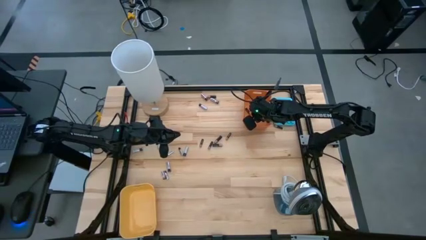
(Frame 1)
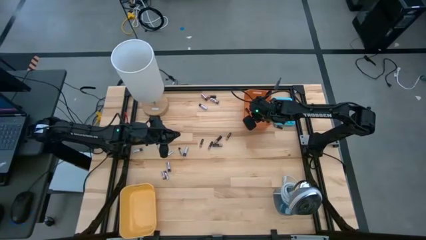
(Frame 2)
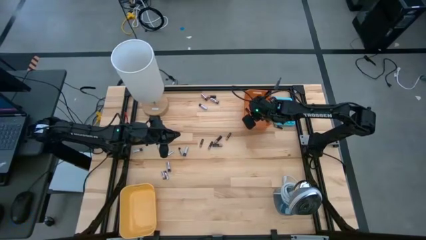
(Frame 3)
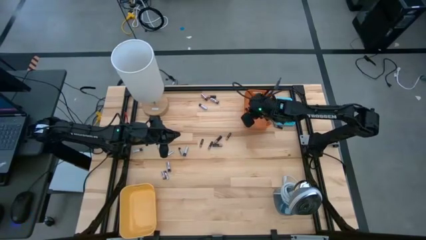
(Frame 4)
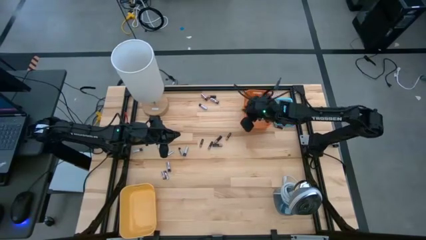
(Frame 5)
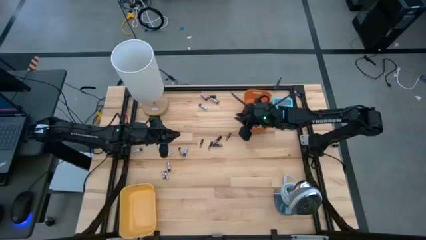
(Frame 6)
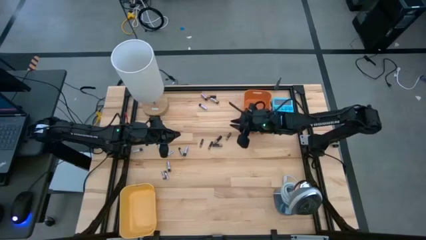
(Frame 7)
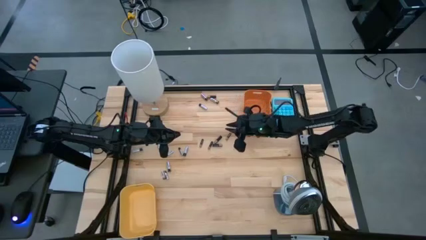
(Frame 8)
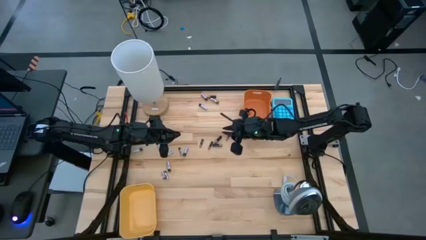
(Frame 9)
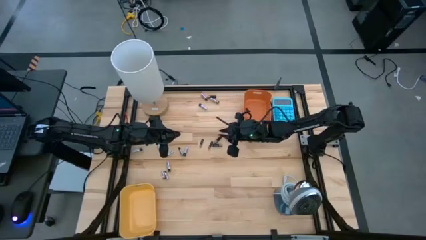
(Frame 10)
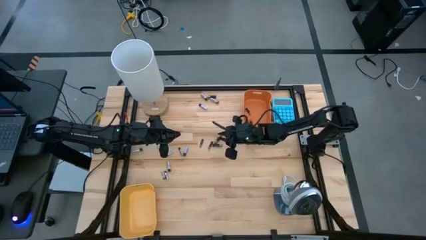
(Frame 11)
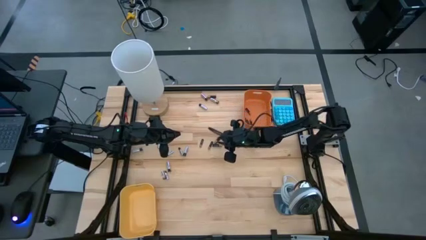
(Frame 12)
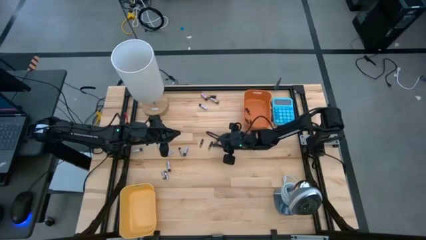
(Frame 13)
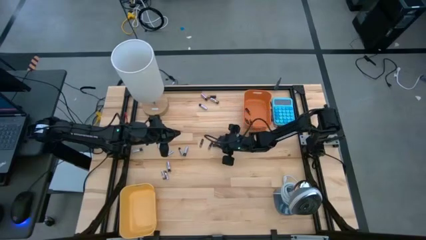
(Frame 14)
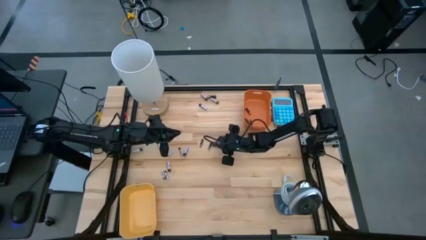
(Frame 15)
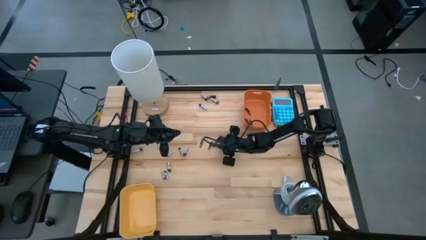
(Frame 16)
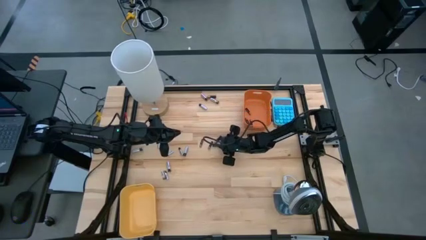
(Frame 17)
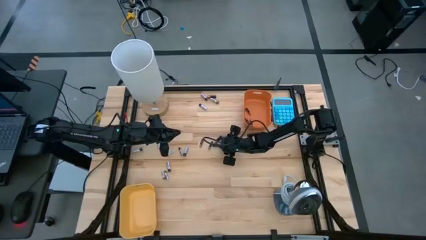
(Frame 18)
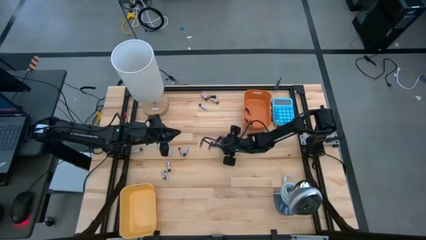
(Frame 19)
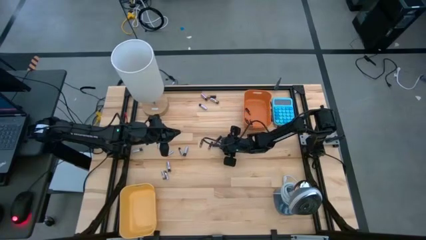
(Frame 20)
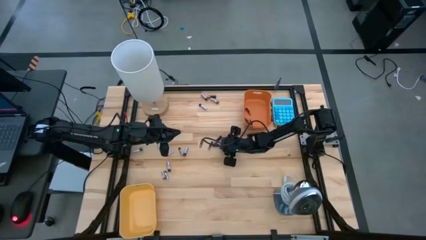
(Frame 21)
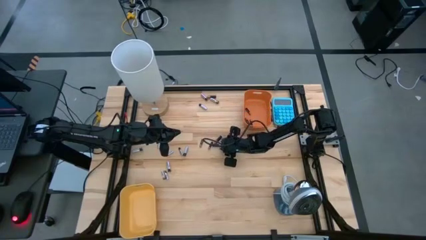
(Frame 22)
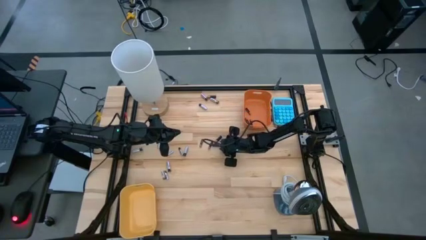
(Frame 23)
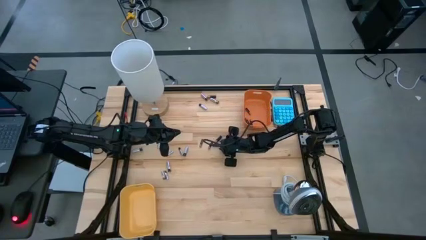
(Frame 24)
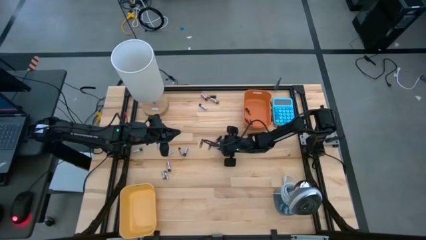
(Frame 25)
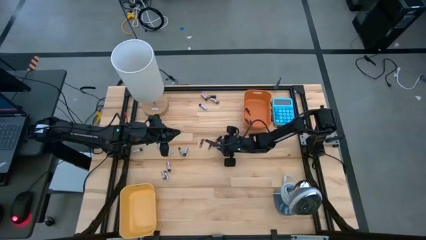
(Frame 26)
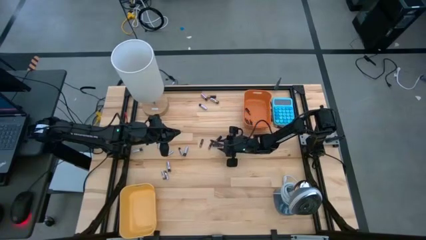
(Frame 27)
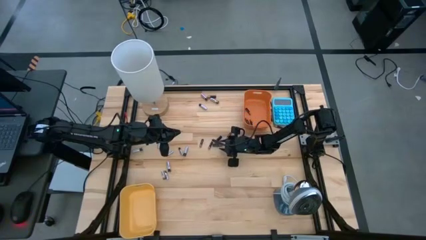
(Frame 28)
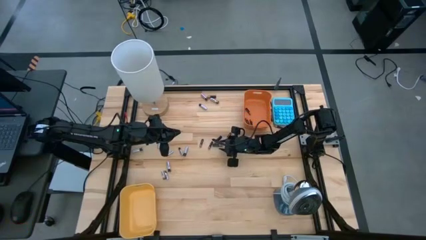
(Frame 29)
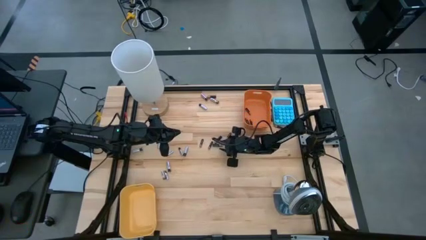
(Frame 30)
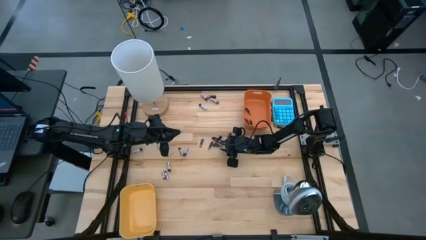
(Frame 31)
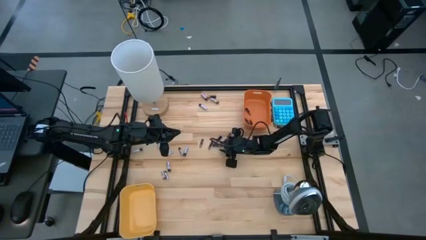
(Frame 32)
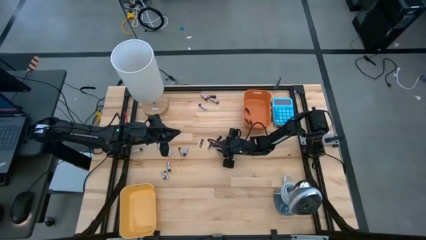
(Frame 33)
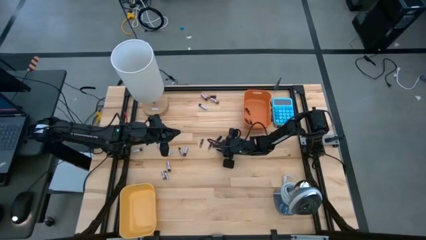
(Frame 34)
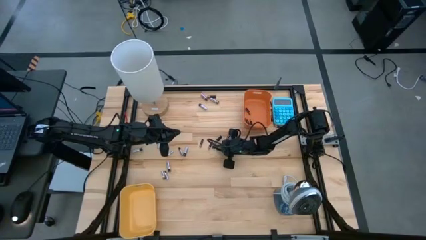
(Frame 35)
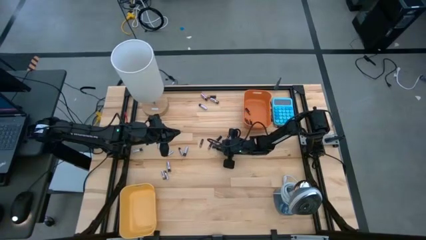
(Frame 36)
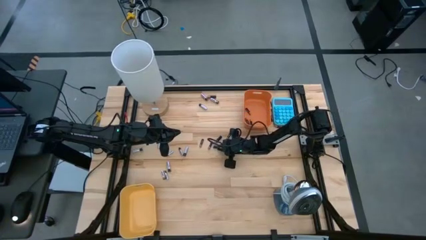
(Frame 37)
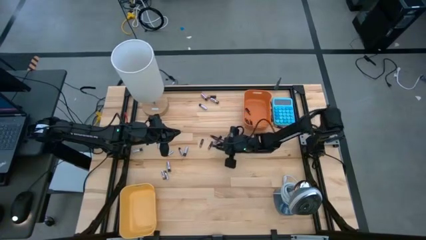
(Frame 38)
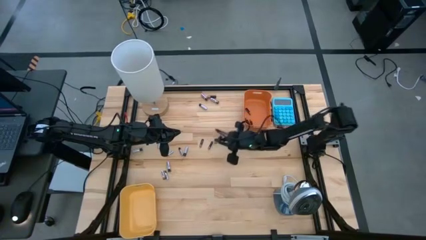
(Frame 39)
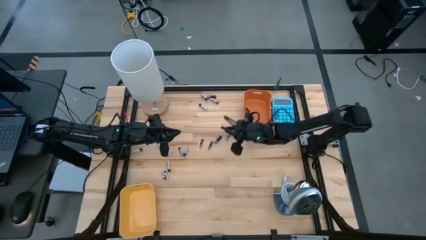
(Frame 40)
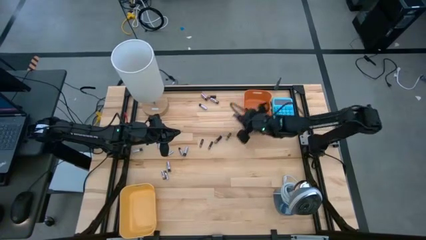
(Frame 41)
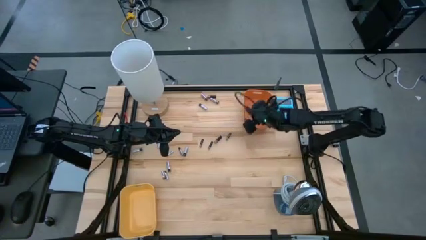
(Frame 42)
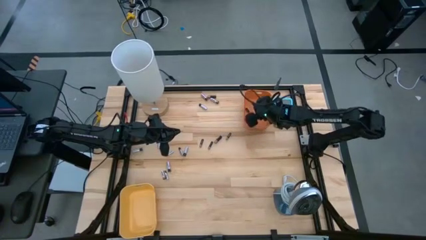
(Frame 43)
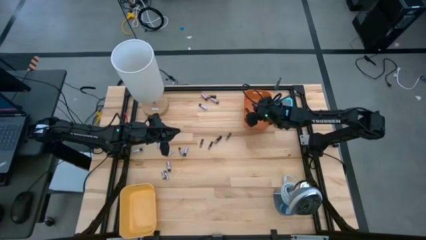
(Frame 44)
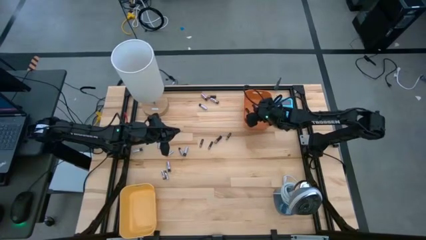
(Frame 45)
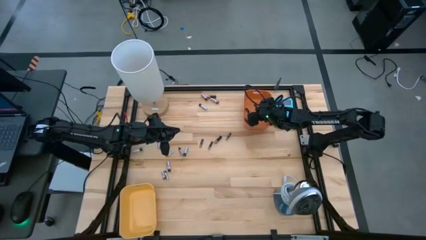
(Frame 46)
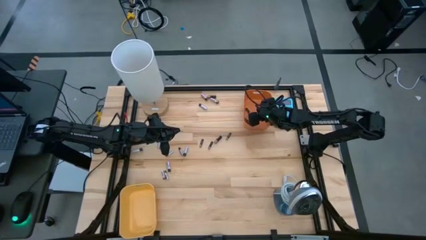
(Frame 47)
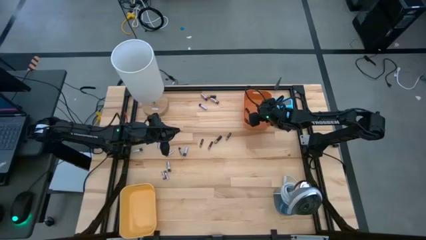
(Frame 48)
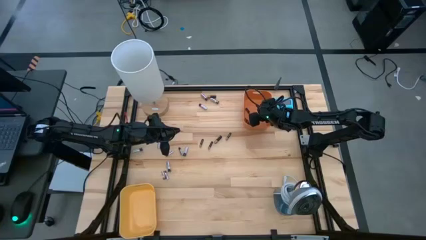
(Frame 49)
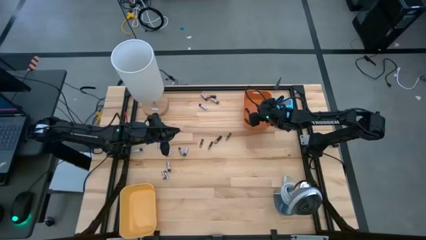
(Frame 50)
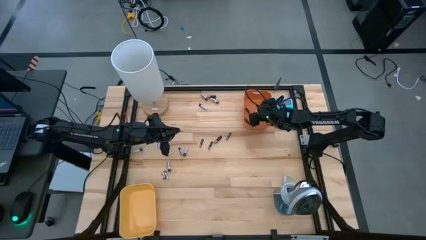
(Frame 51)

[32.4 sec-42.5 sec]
Task: Sort batteries
Put the black battery into the orange bin
